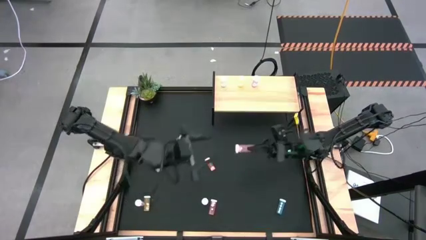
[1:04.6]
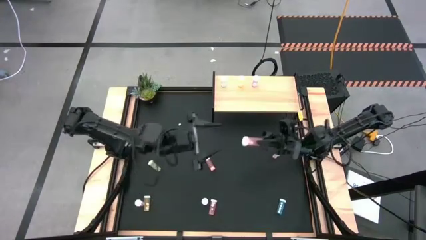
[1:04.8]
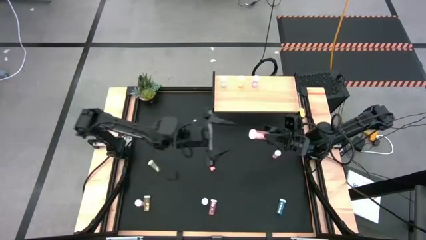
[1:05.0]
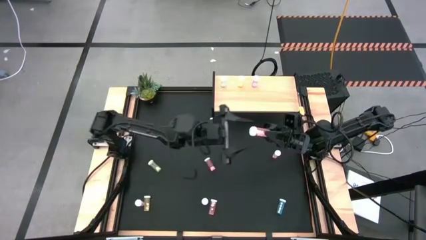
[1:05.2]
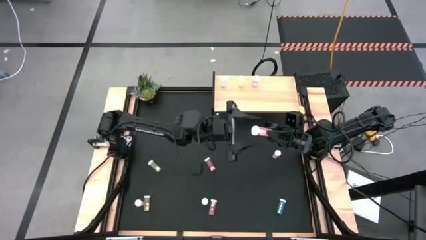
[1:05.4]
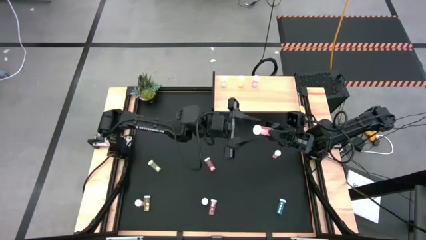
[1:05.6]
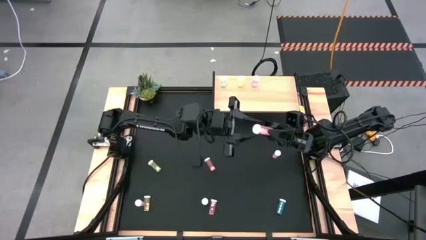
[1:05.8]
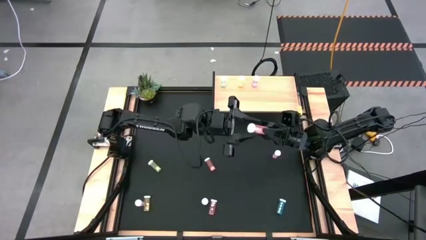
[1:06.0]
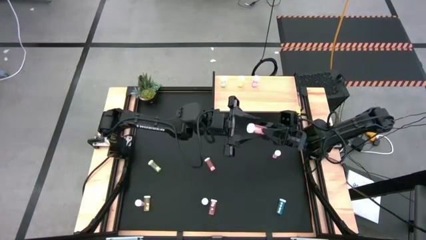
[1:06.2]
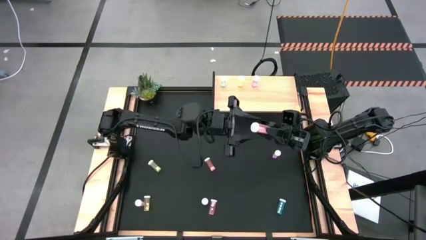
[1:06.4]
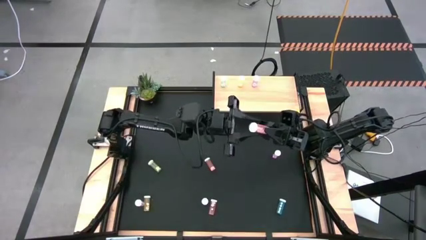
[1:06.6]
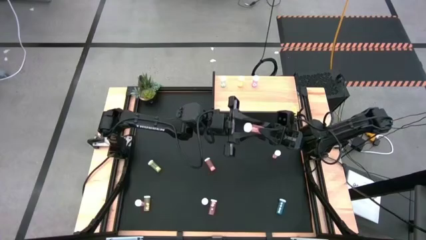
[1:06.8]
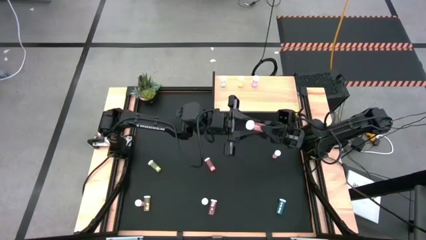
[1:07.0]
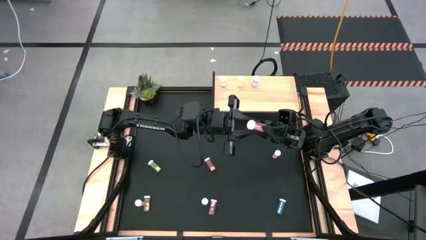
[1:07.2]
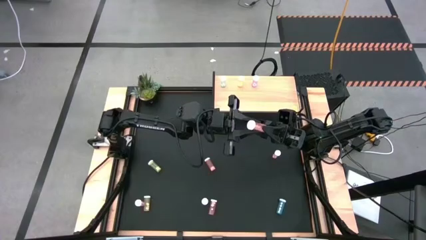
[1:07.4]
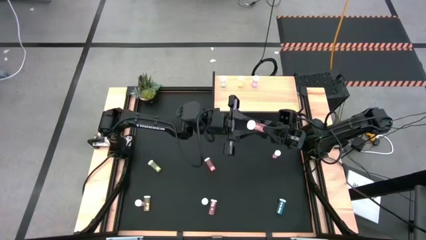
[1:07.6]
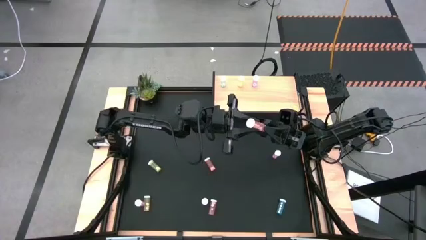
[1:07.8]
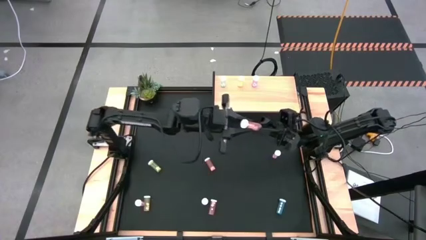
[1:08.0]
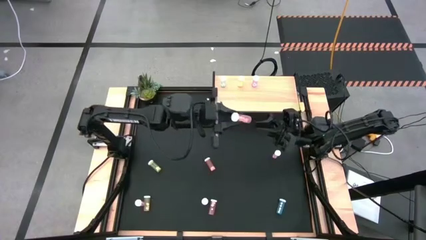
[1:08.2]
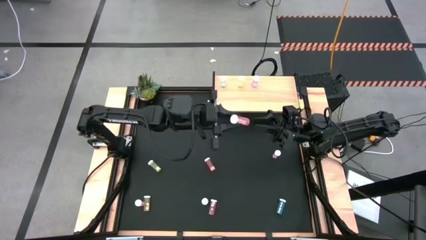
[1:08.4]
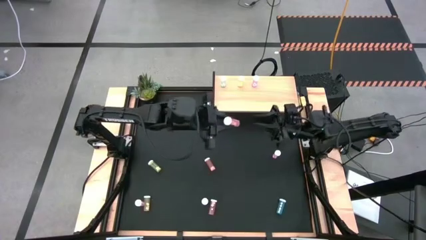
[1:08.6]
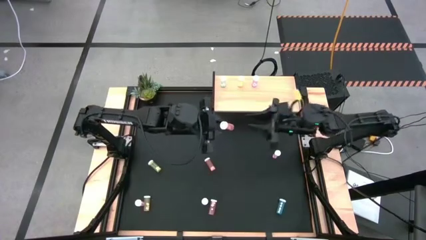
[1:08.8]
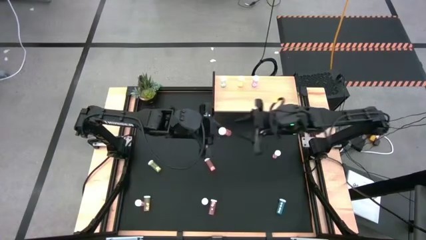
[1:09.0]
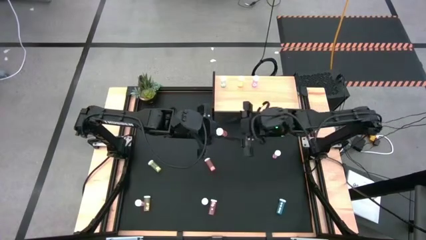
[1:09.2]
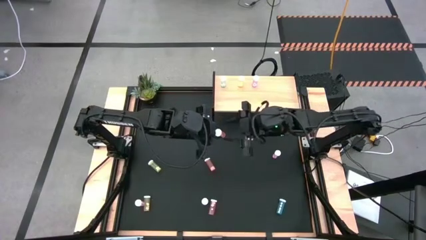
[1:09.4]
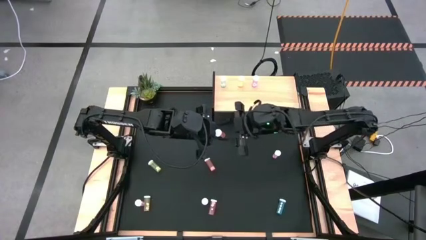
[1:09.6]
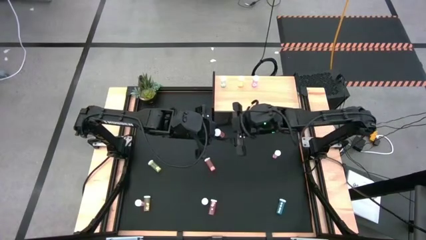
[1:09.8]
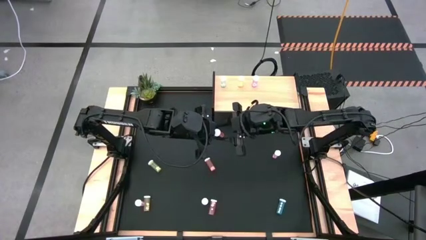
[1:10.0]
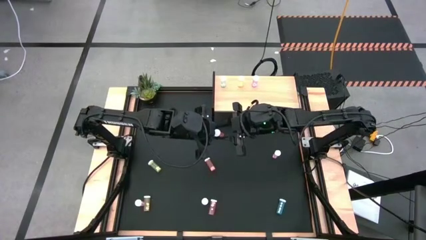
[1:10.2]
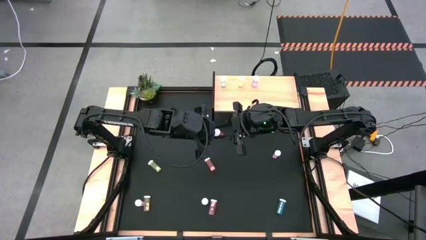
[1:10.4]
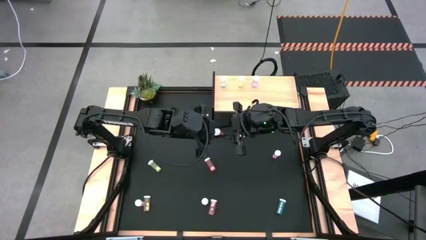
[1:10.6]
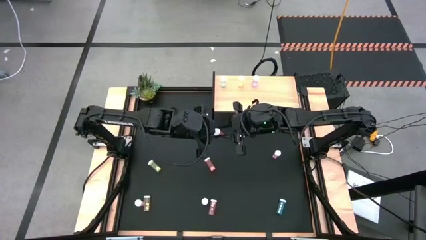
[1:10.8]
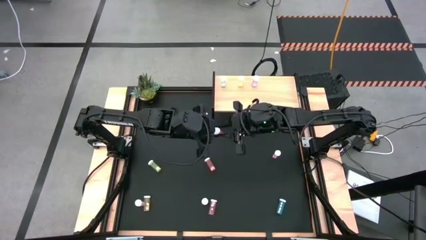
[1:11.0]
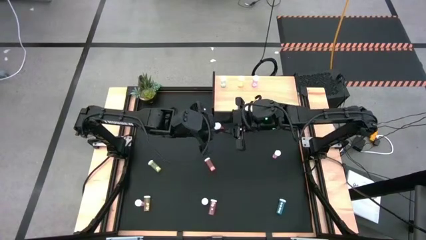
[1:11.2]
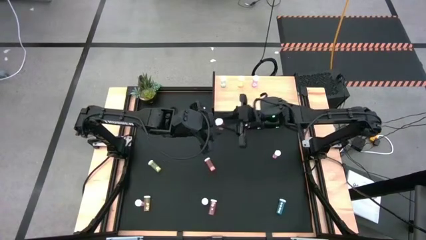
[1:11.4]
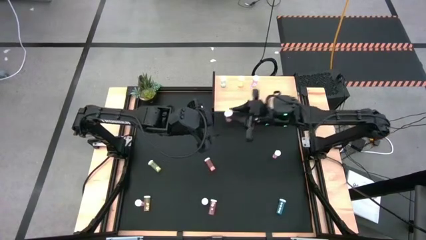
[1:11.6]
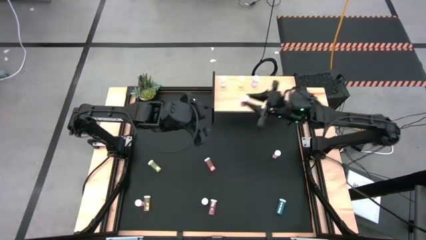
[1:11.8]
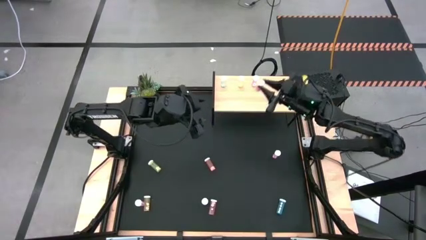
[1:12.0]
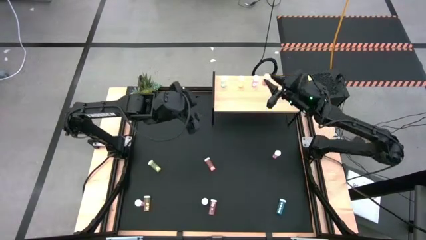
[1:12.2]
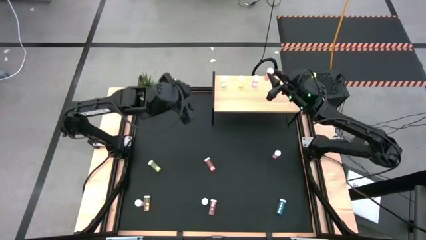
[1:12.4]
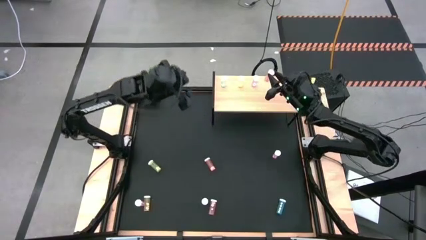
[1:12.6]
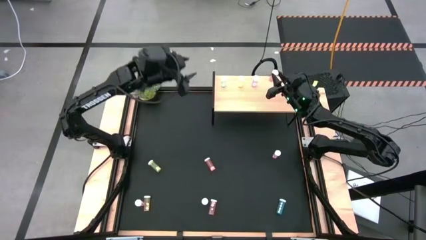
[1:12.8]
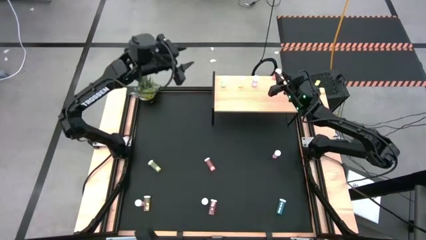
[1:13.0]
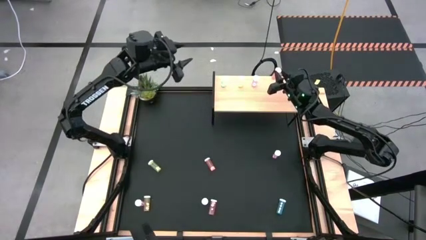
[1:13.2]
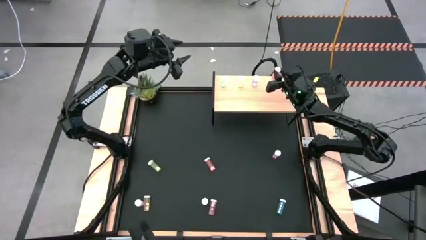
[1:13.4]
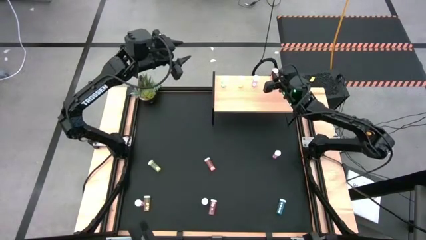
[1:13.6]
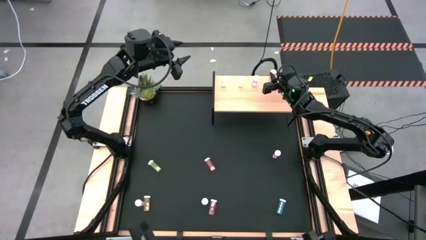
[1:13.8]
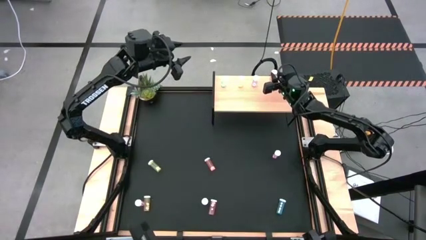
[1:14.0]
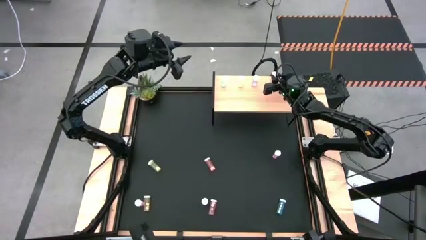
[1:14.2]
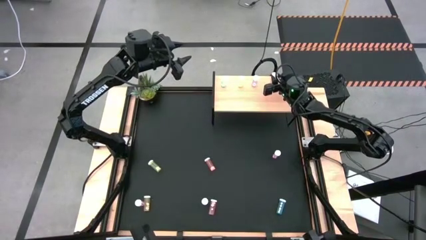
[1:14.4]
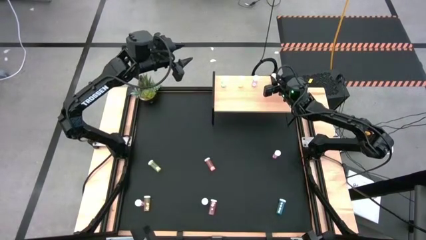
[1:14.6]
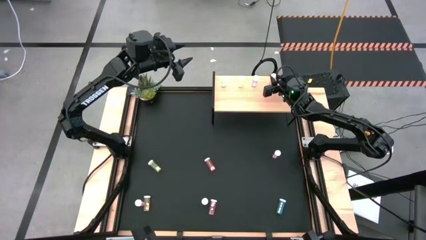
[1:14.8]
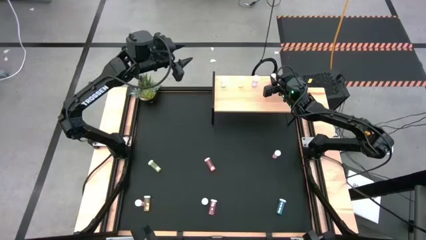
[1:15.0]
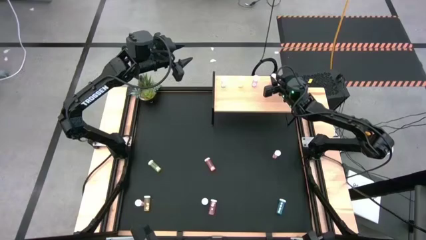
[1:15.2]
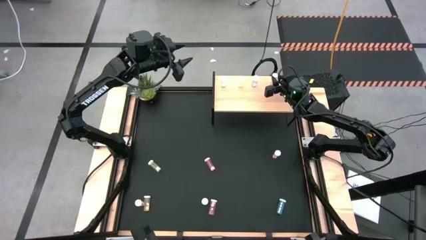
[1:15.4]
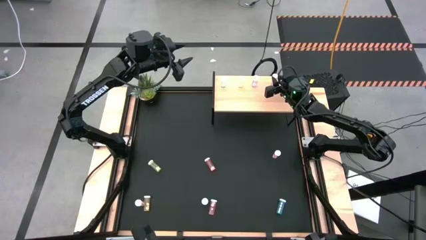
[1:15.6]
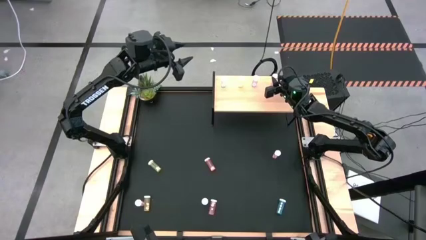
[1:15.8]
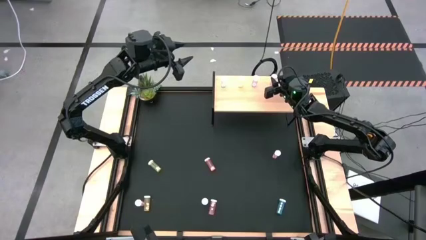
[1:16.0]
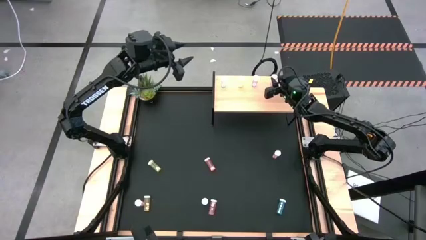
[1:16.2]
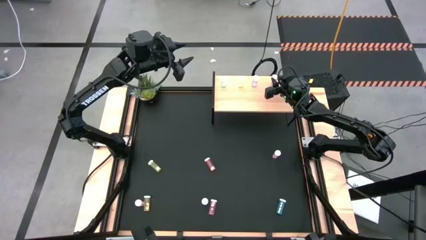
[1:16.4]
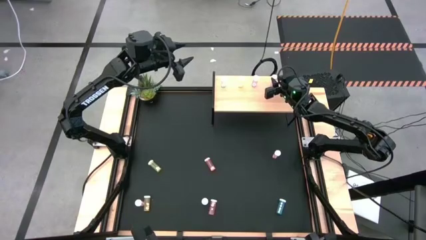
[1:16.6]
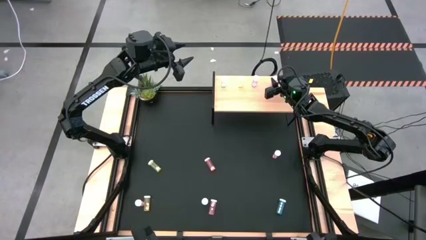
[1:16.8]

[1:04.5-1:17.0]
Task: Pick and place medicine bottles onto shelf by color
Put the top orange pill bottle on the shelf
